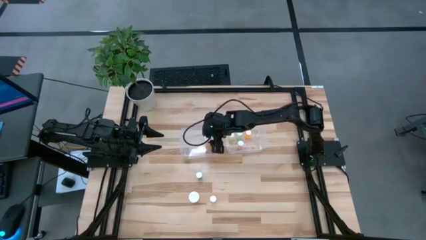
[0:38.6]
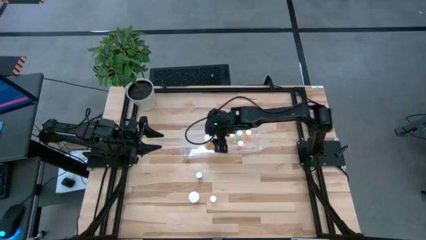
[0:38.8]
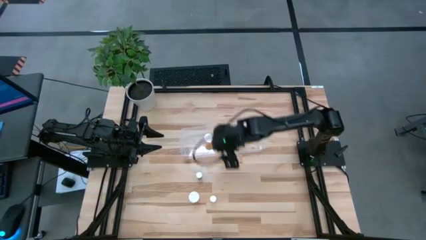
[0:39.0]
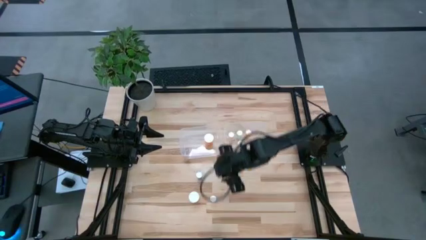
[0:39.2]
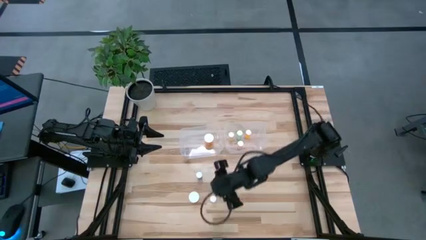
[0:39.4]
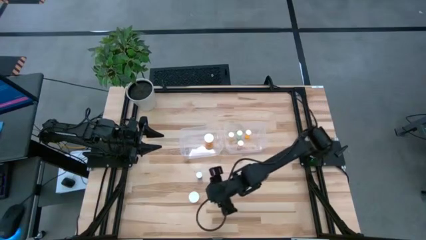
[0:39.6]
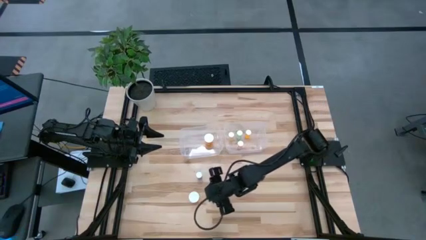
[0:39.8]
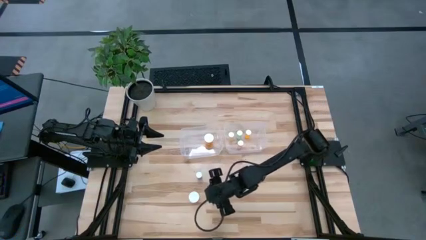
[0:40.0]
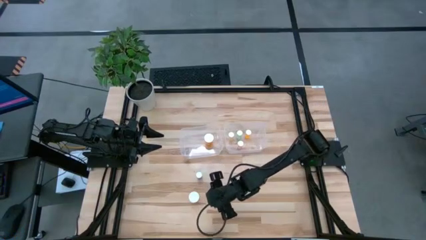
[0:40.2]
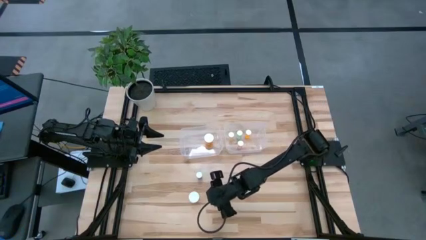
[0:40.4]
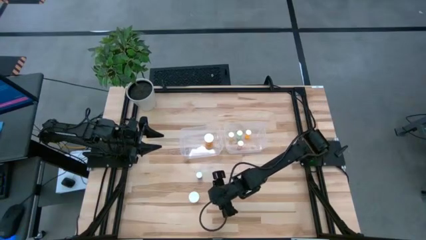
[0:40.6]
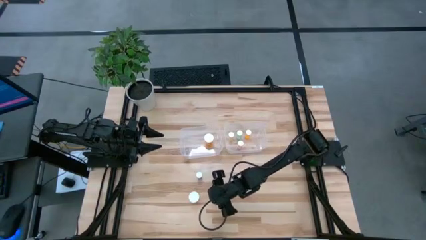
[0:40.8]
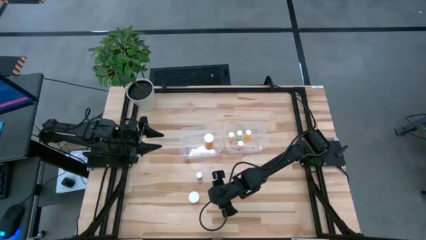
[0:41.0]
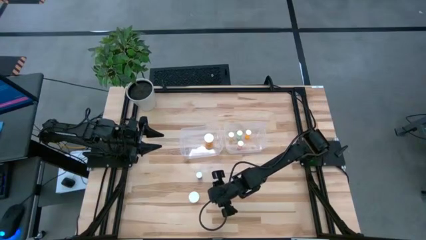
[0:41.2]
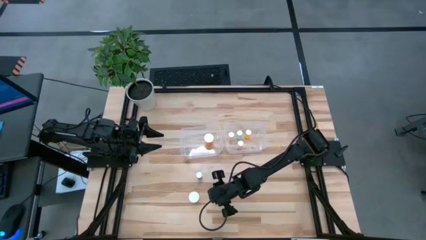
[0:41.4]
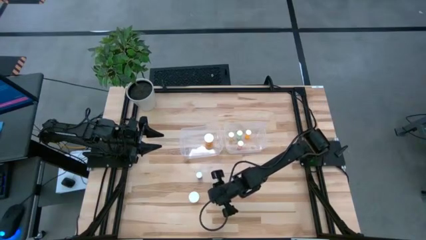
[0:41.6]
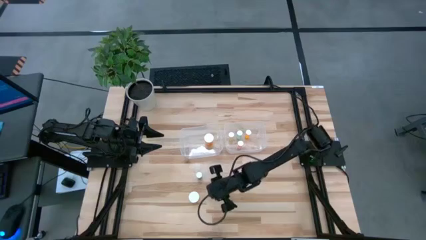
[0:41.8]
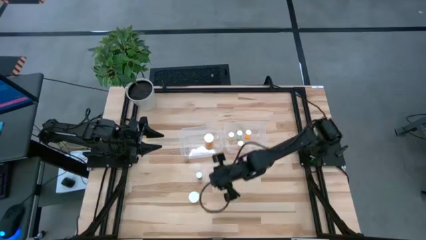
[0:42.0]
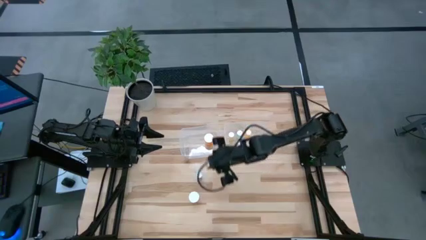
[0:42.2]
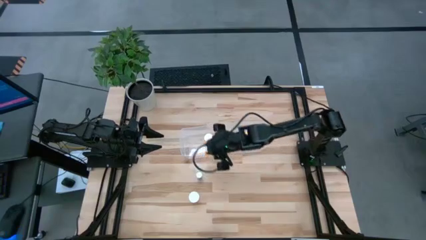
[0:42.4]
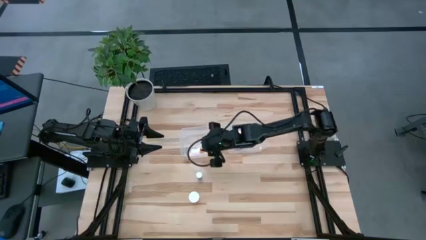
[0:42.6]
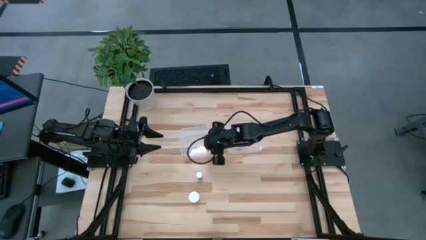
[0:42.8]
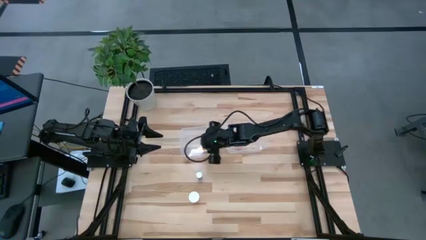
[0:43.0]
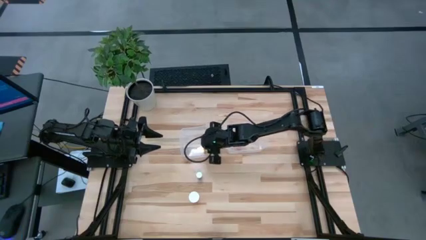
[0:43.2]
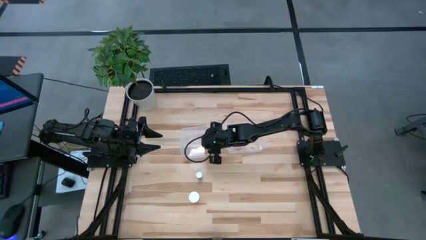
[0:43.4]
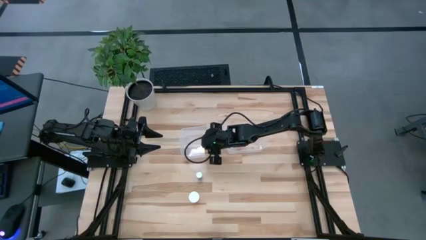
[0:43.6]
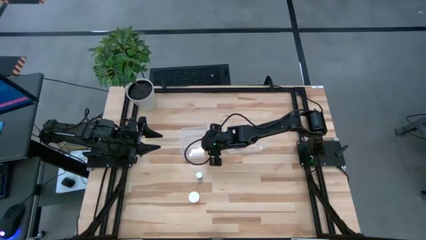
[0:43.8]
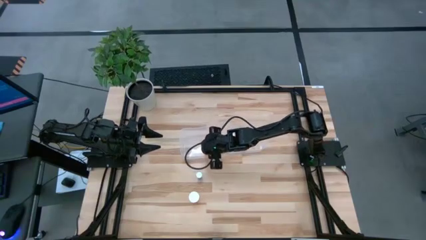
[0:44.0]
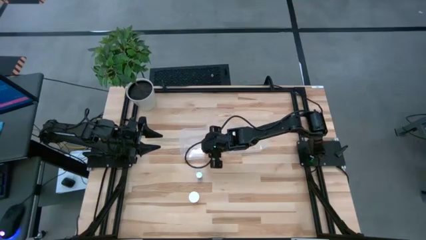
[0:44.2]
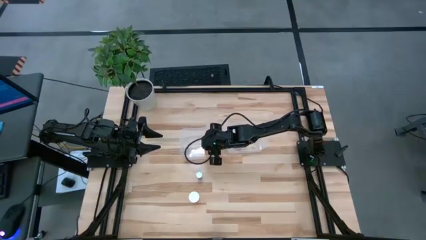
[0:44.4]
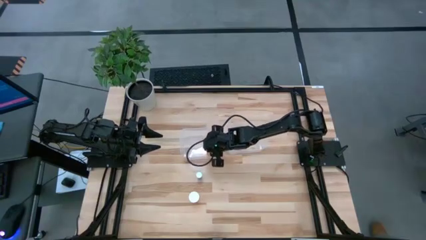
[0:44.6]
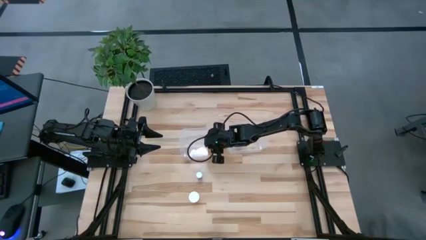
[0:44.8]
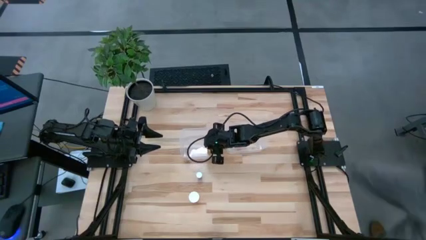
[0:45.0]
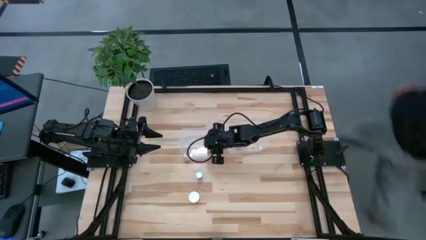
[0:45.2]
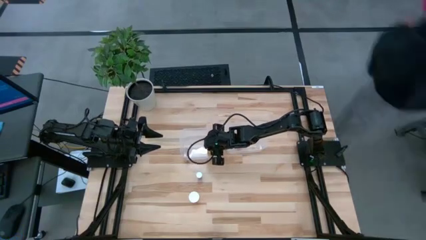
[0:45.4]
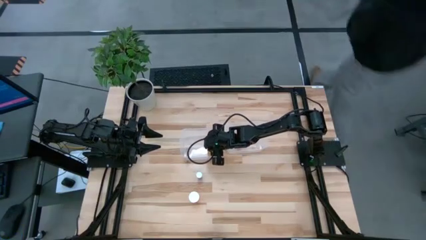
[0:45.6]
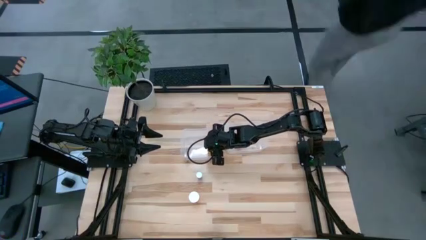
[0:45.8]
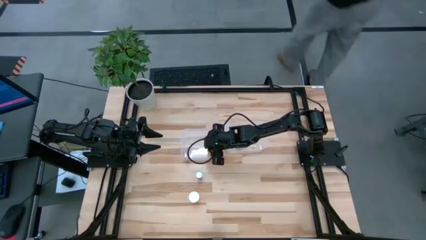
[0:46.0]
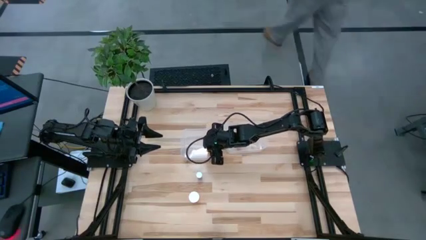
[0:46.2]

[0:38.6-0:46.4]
Task: Pick and place medicine bottles into bin by pill shape (circle, oval)
Put the small orange pill bottle into the left transparent bin

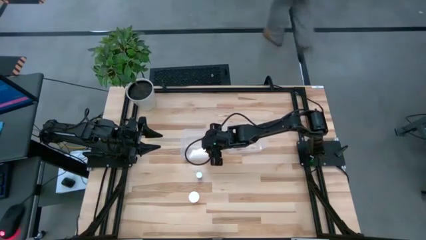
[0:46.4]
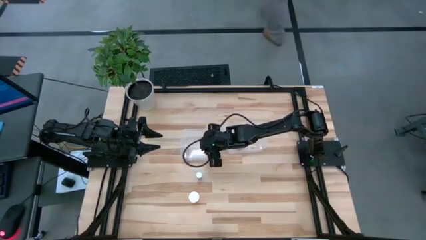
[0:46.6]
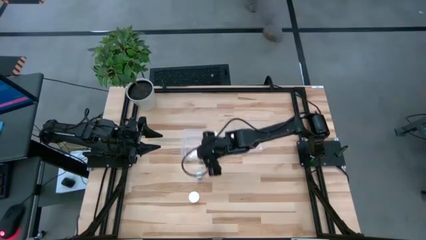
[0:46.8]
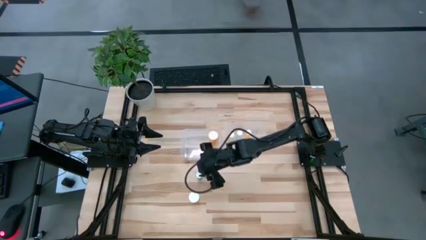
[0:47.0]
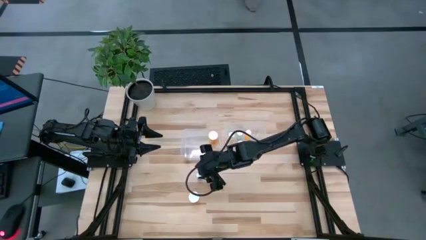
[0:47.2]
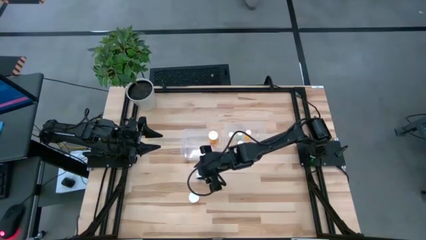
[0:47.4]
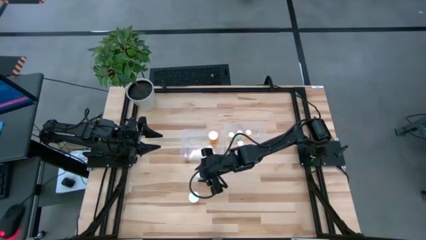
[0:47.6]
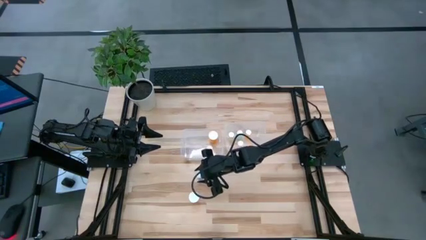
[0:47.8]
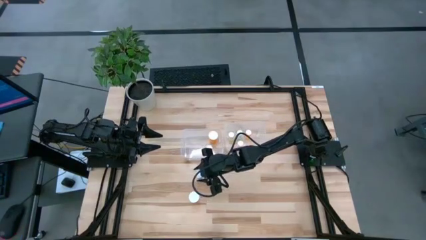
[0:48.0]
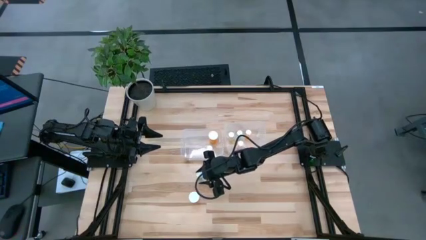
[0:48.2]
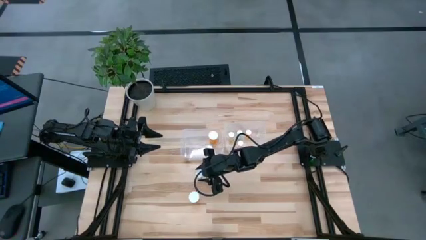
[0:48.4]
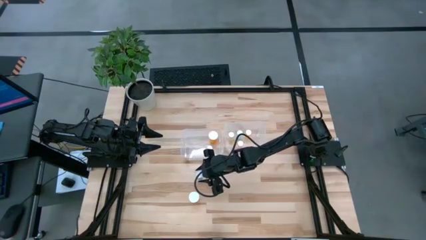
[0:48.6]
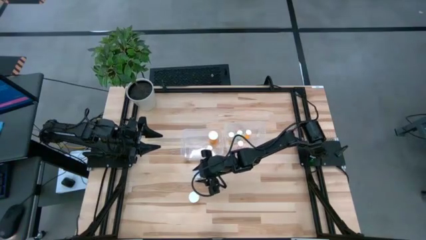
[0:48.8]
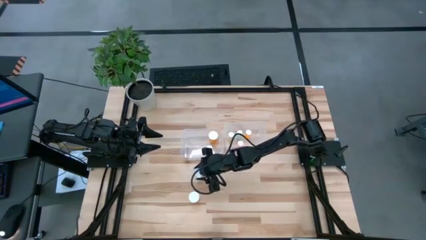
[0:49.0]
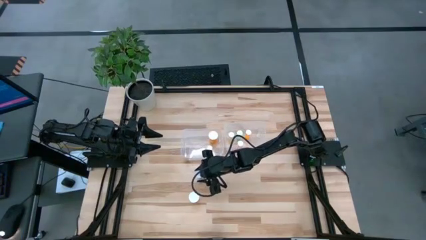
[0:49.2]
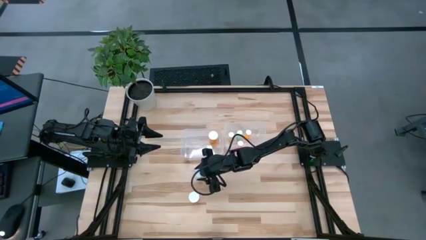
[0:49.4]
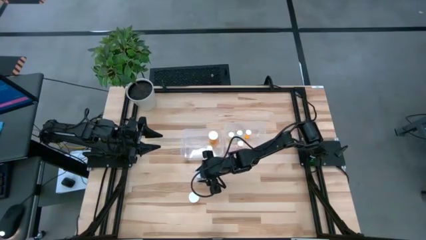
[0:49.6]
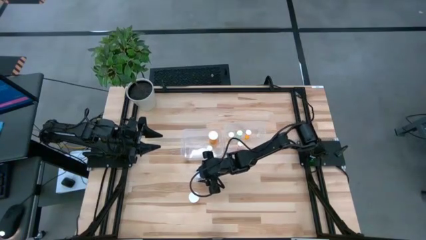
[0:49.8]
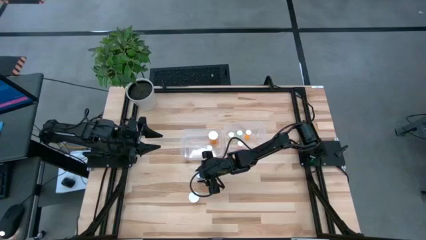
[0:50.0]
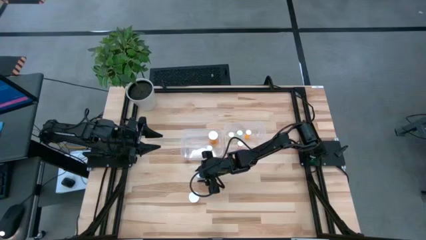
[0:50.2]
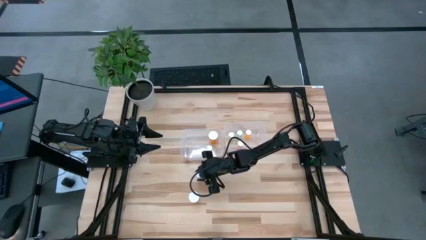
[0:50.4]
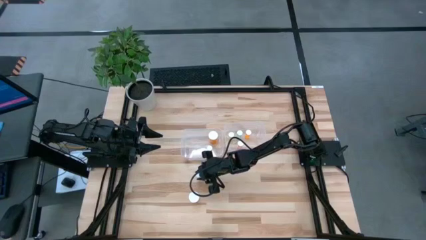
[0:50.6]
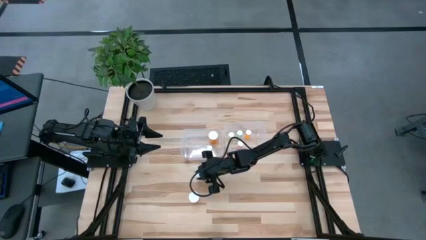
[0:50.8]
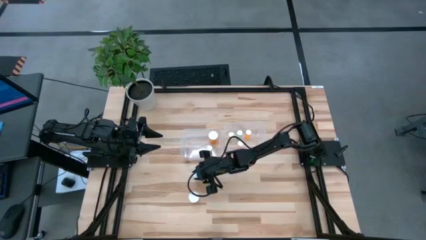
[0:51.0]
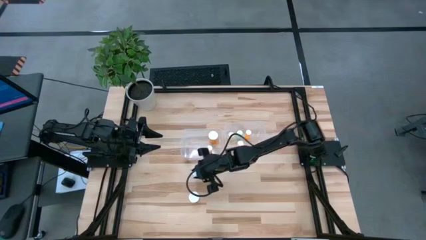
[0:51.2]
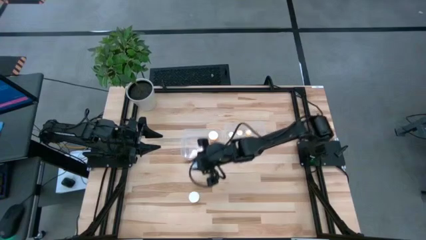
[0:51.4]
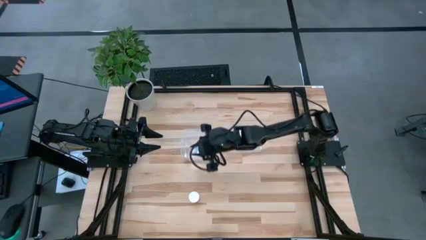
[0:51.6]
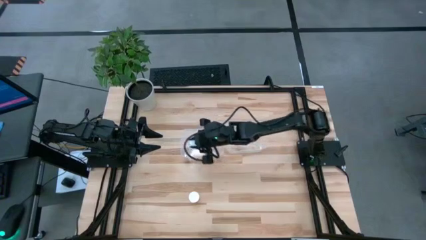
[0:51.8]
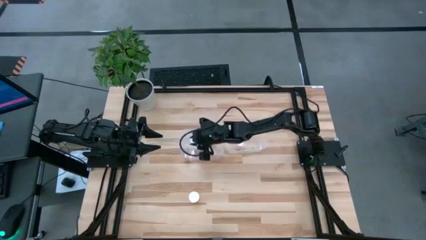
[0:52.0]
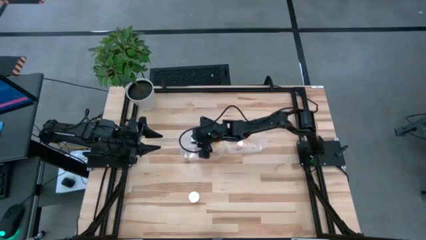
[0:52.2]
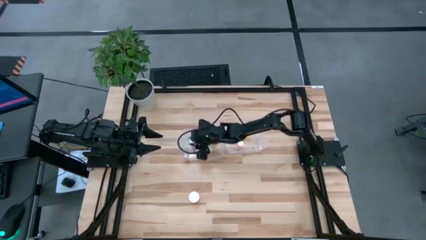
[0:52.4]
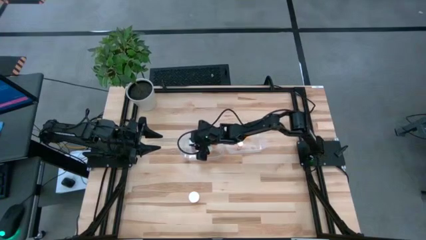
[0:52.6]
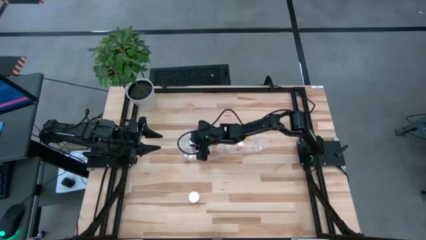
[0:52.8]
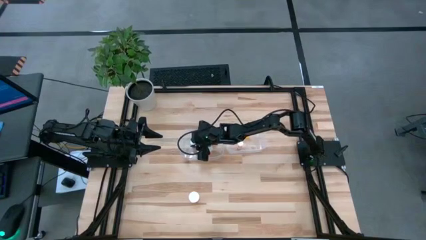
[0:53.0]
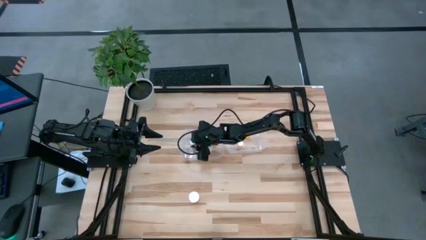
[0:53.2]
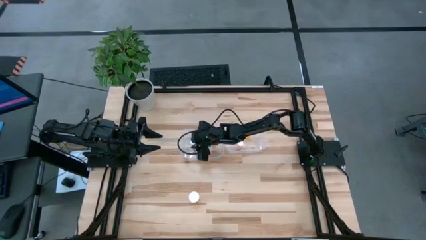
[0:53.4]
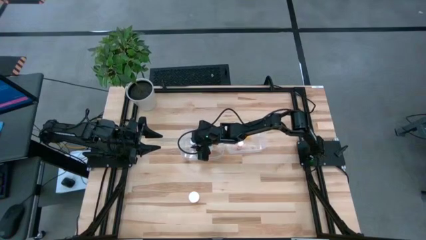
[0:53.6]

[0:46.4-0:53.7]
Put the blue pill bottle into the left transparent bin

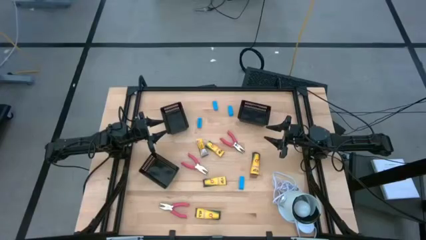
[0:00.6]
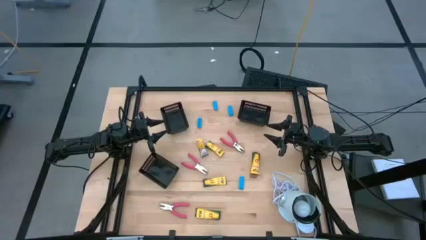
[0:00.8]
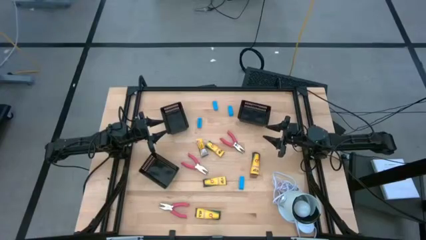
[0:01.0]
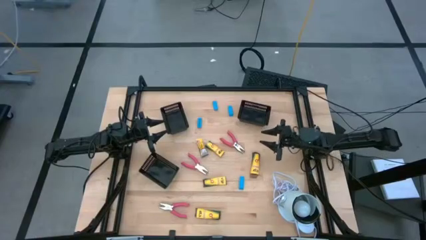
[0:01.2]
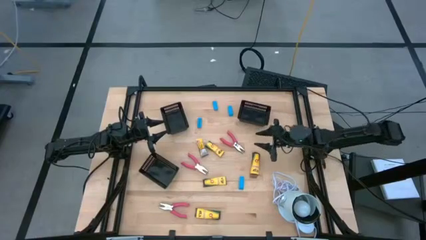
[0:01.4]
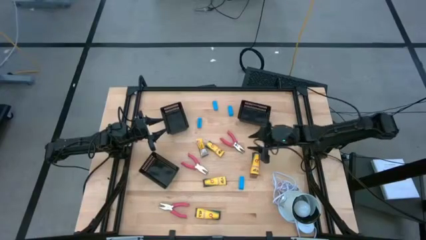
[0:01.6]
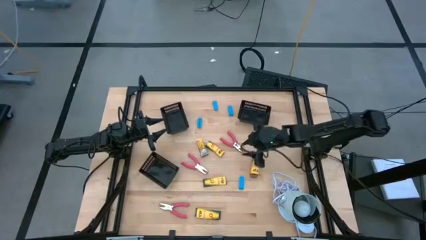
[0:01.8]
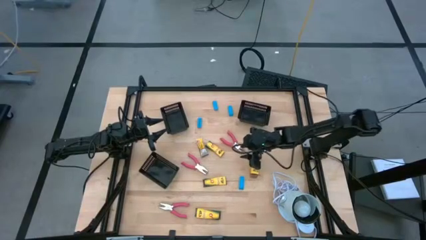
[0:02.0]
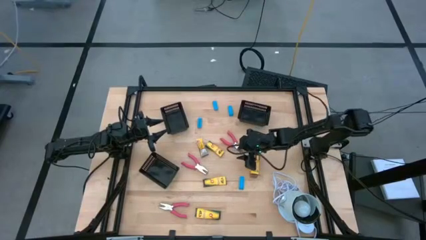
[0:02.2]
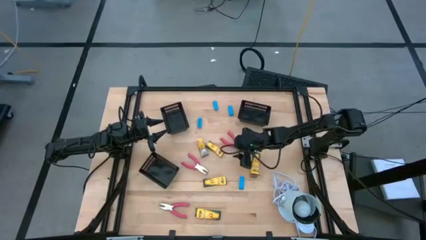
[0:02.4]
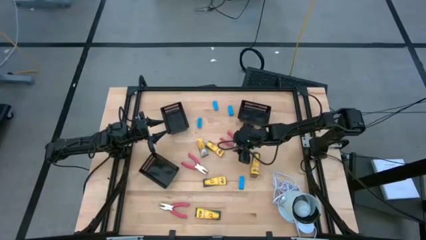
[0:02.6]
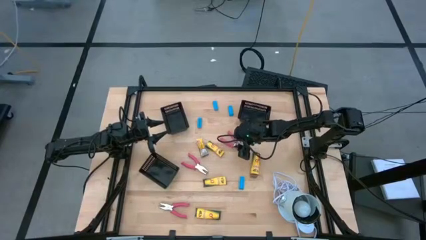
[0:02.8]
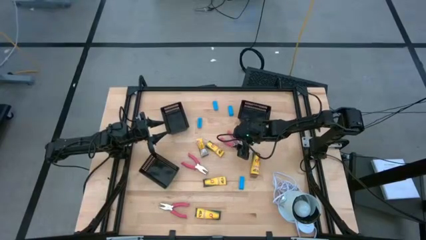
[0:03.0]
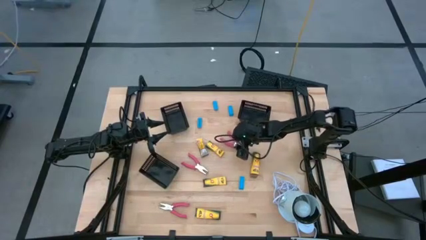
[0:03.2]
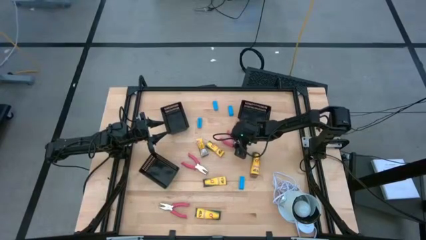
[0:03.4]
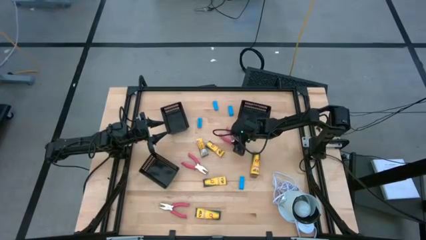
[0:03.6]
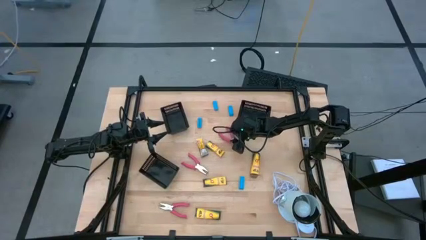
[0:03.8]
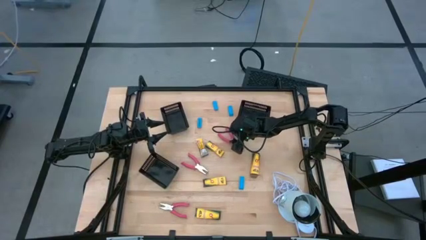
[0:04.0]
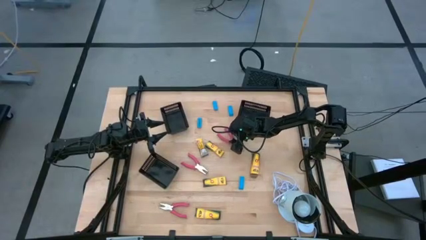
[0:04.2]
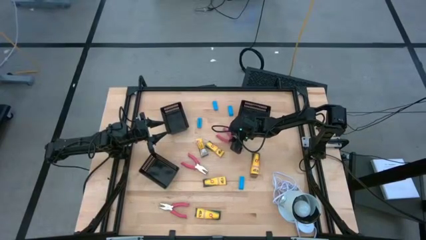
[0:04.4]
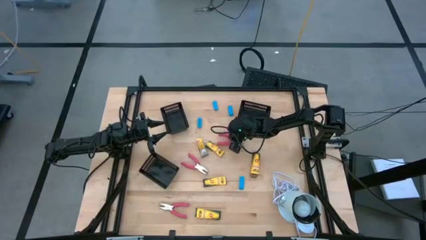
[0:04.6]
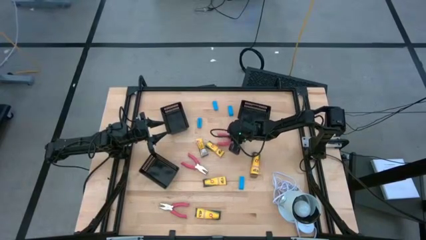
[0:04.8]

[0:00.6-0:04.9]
Task: Pick & Place School Supplies
Put the pink grommet eyelet pliers into the top right black bin
